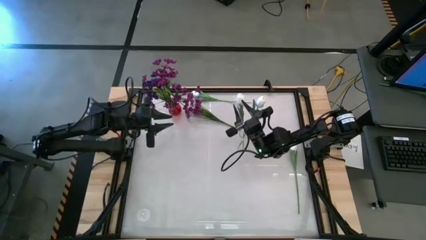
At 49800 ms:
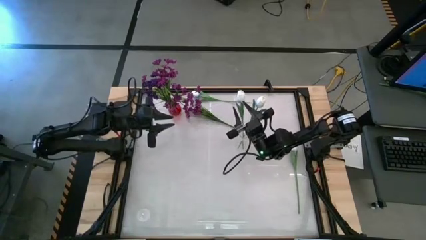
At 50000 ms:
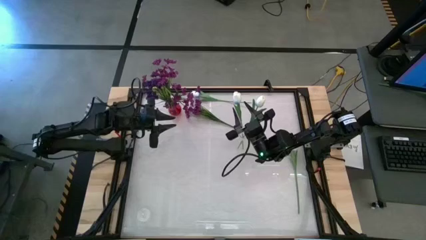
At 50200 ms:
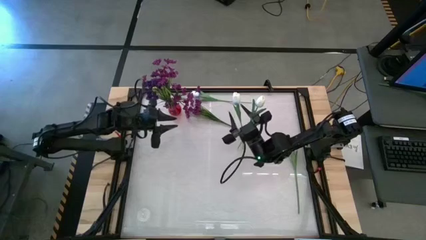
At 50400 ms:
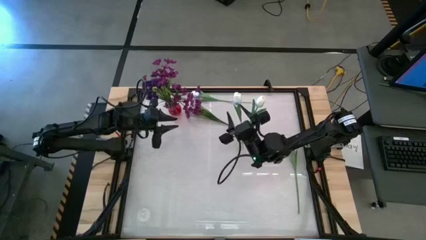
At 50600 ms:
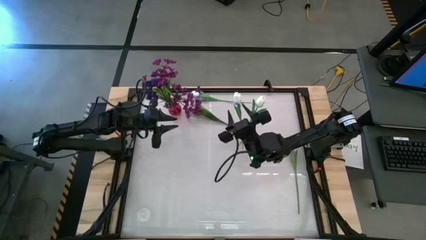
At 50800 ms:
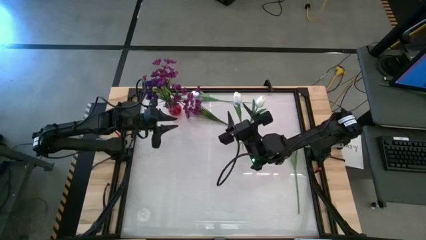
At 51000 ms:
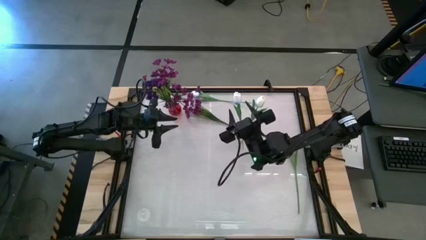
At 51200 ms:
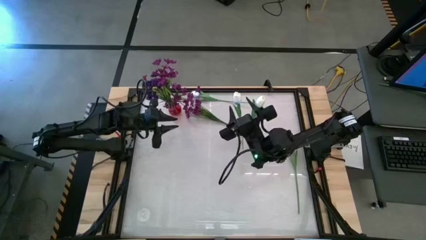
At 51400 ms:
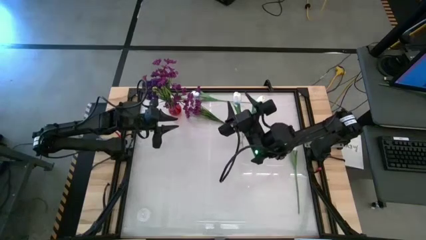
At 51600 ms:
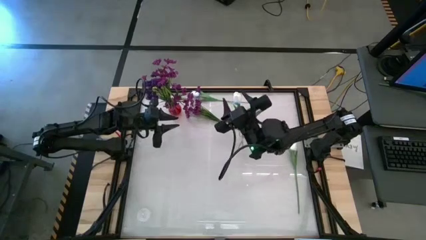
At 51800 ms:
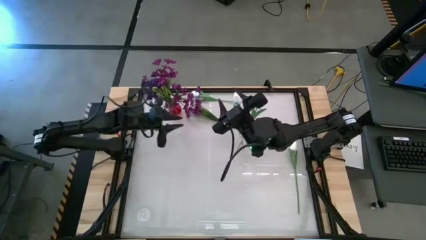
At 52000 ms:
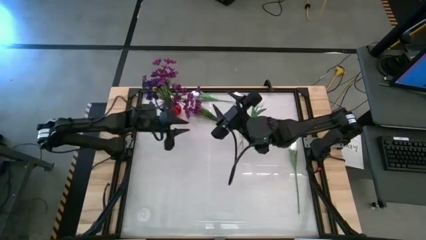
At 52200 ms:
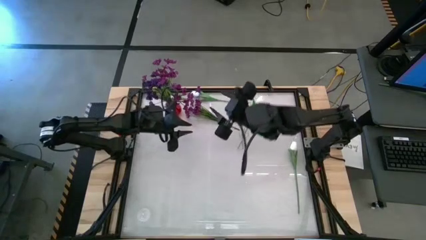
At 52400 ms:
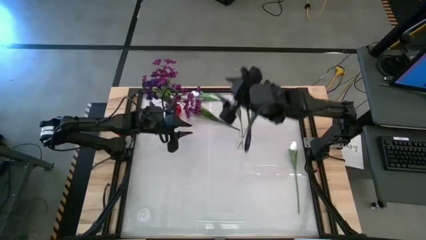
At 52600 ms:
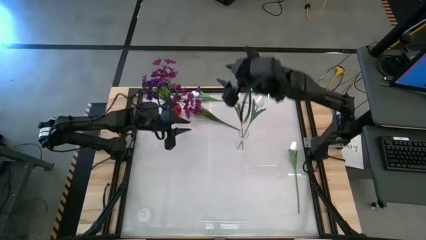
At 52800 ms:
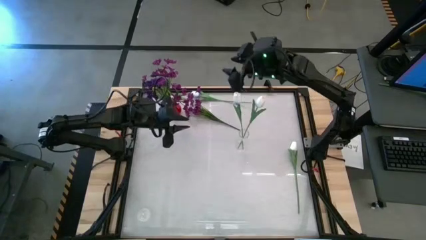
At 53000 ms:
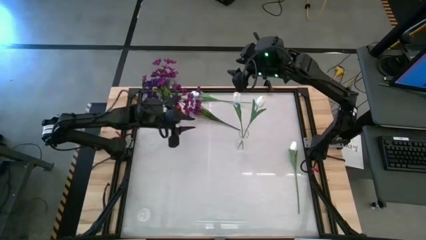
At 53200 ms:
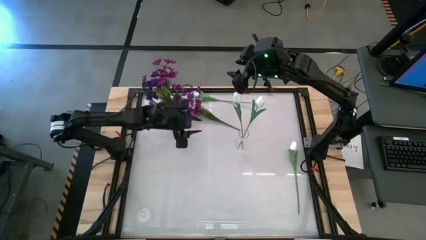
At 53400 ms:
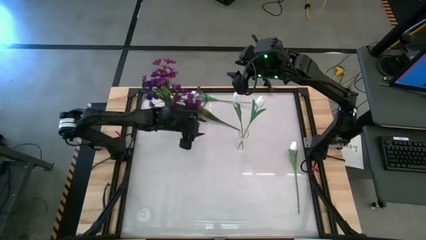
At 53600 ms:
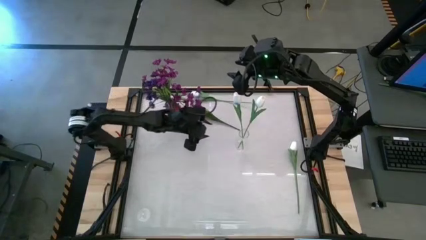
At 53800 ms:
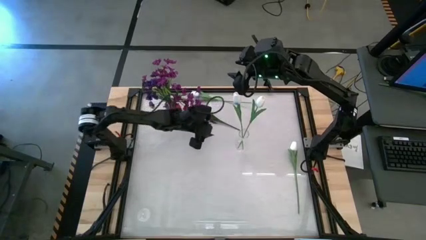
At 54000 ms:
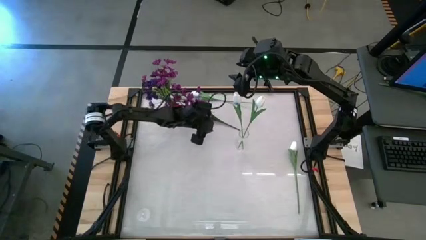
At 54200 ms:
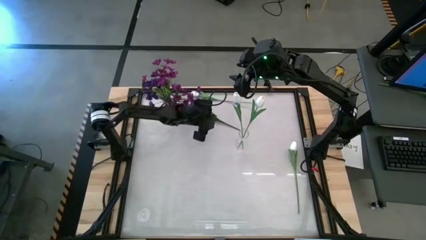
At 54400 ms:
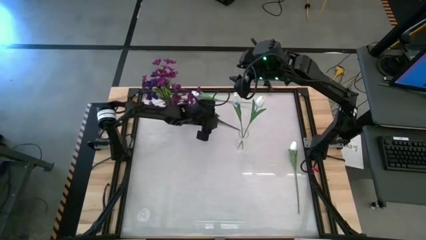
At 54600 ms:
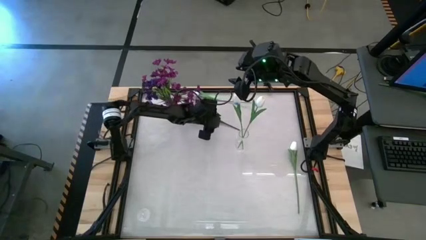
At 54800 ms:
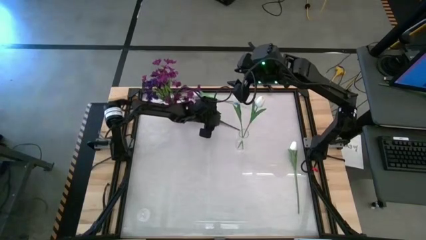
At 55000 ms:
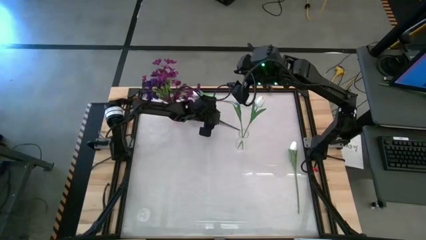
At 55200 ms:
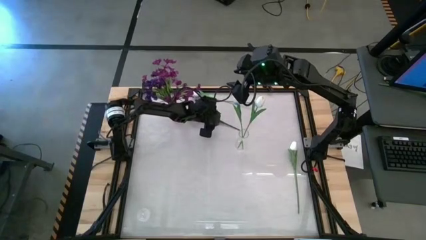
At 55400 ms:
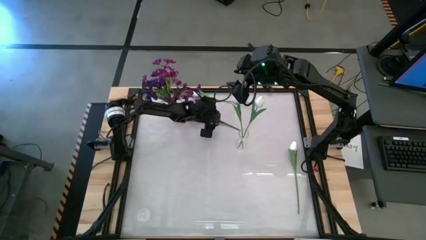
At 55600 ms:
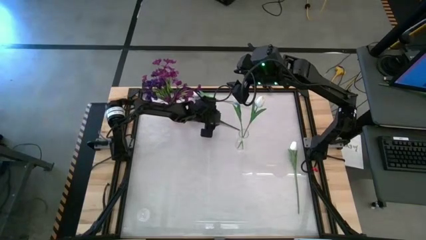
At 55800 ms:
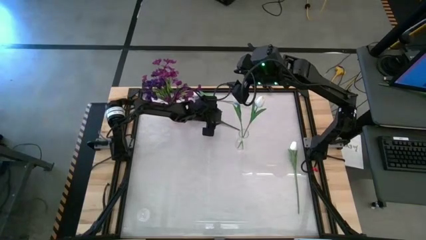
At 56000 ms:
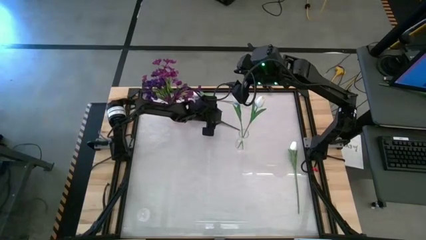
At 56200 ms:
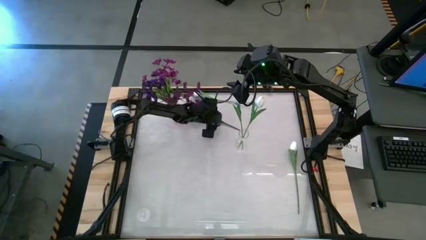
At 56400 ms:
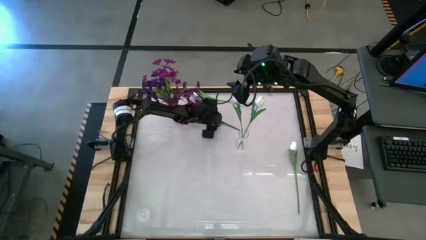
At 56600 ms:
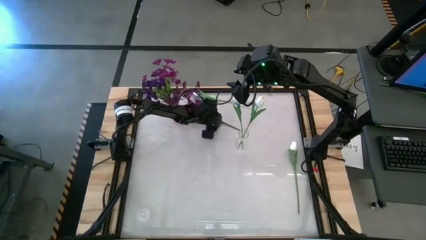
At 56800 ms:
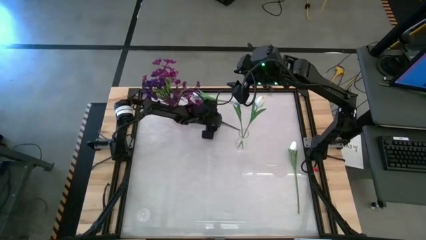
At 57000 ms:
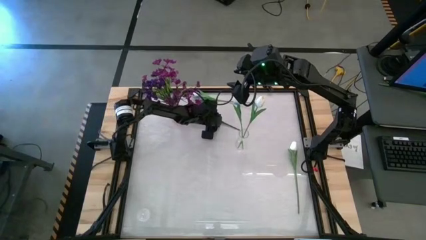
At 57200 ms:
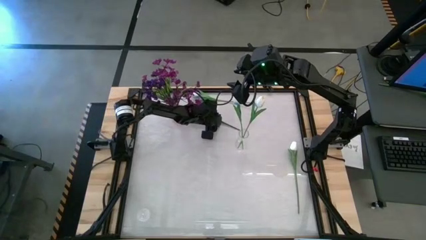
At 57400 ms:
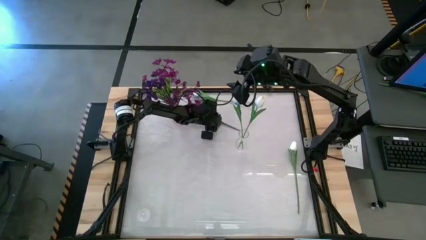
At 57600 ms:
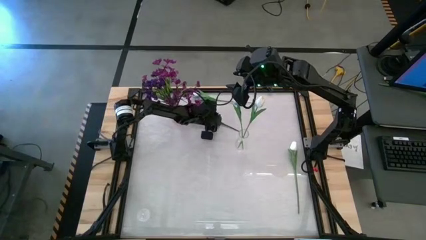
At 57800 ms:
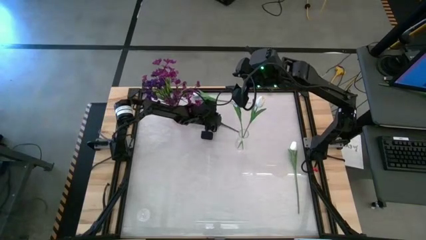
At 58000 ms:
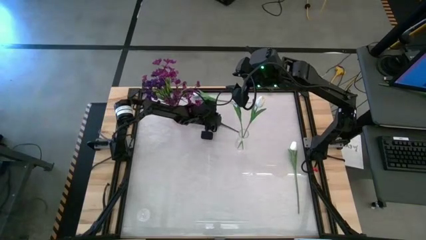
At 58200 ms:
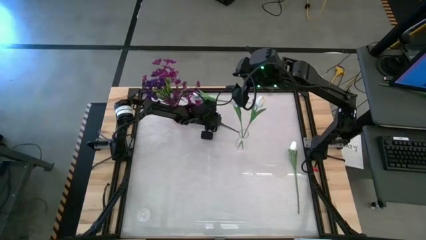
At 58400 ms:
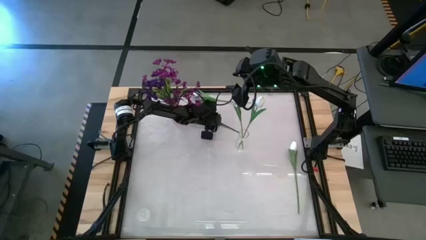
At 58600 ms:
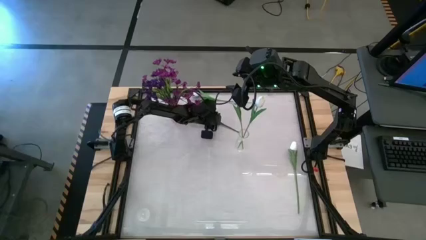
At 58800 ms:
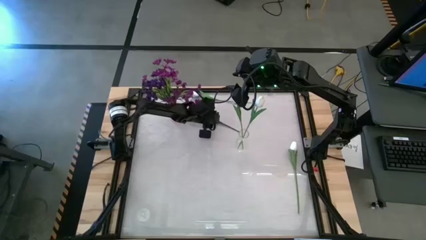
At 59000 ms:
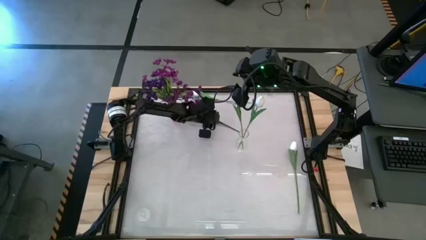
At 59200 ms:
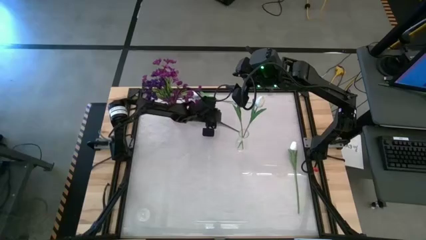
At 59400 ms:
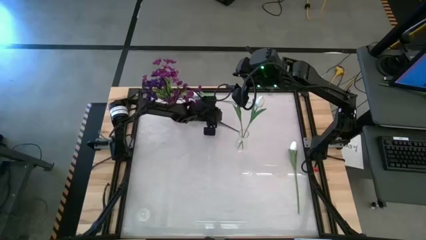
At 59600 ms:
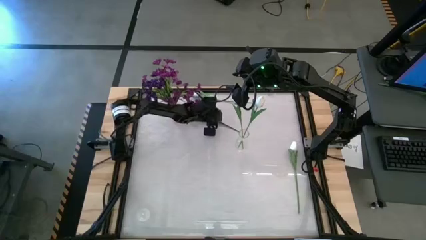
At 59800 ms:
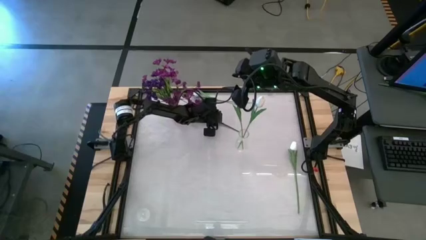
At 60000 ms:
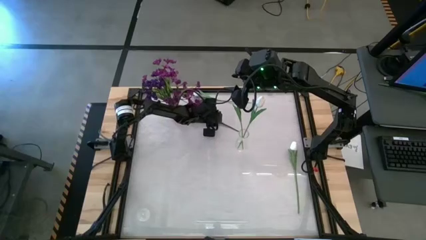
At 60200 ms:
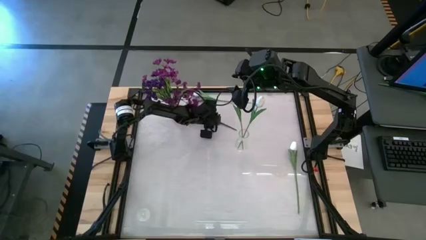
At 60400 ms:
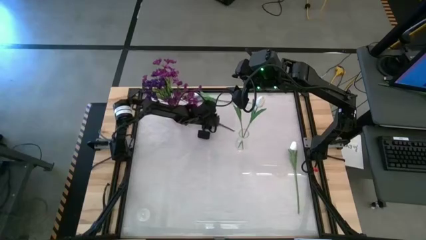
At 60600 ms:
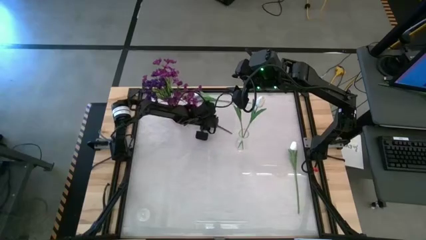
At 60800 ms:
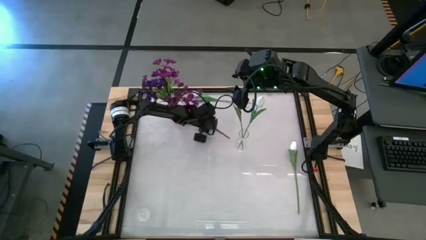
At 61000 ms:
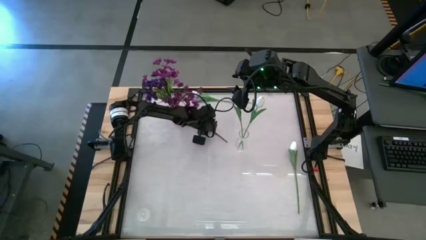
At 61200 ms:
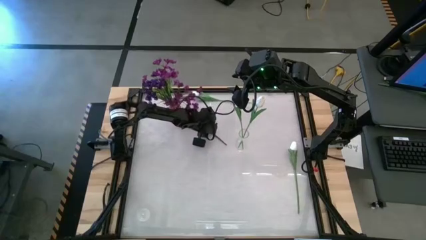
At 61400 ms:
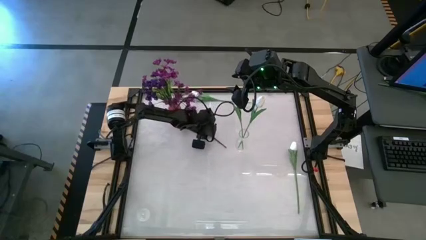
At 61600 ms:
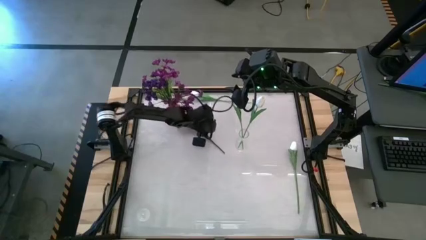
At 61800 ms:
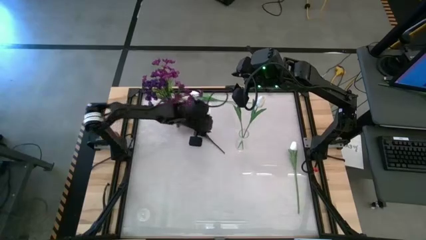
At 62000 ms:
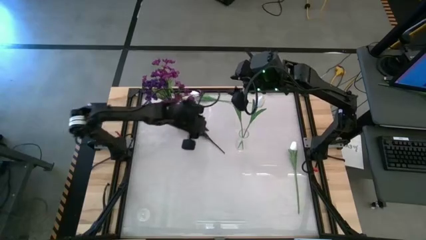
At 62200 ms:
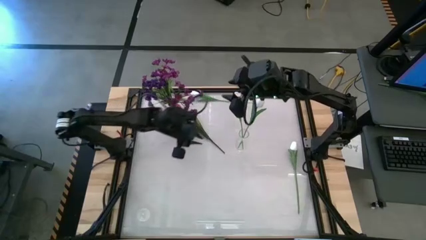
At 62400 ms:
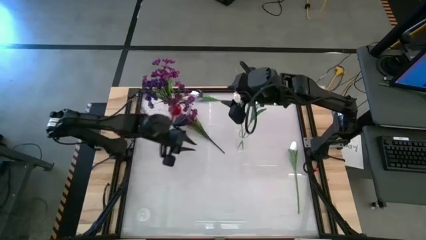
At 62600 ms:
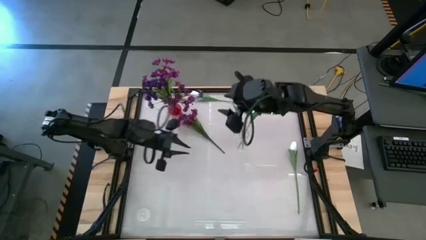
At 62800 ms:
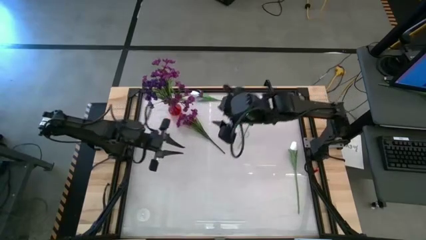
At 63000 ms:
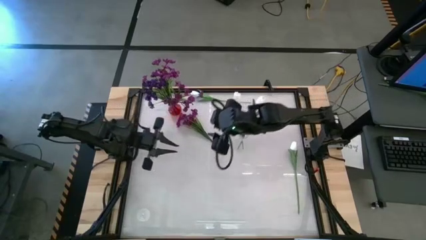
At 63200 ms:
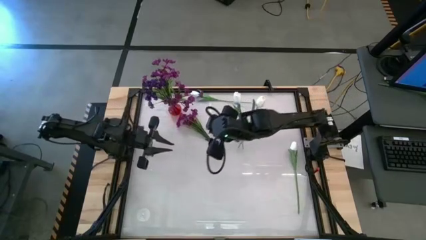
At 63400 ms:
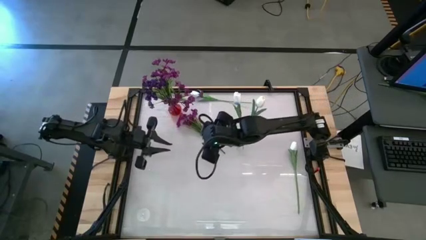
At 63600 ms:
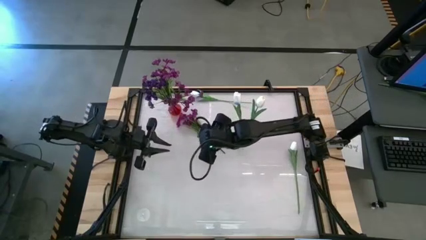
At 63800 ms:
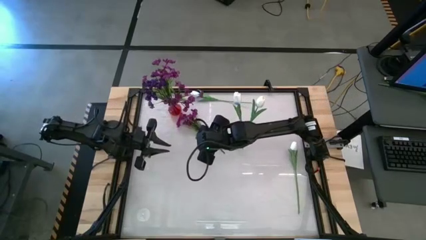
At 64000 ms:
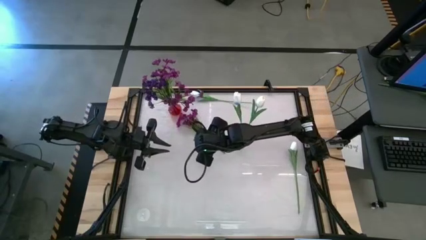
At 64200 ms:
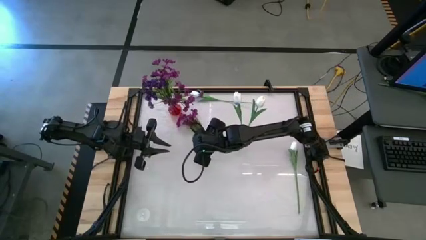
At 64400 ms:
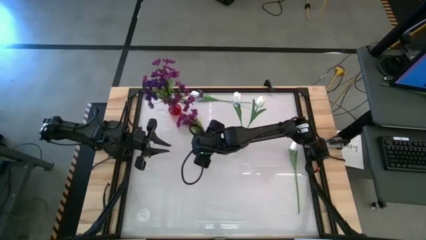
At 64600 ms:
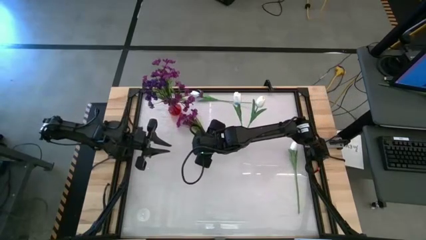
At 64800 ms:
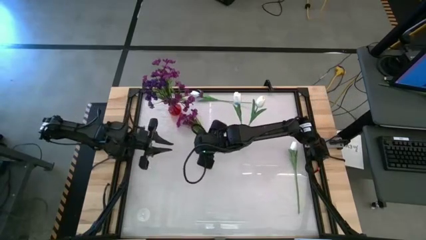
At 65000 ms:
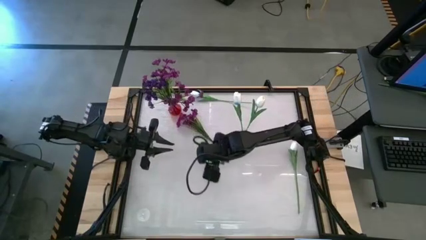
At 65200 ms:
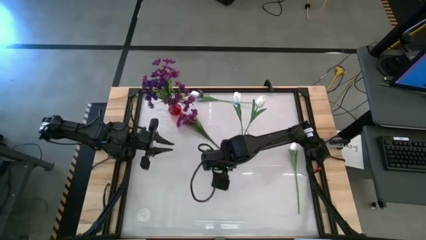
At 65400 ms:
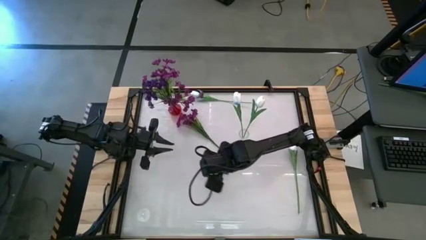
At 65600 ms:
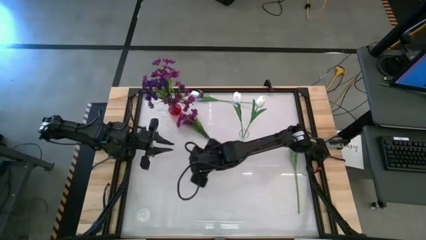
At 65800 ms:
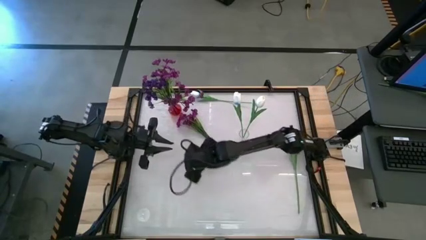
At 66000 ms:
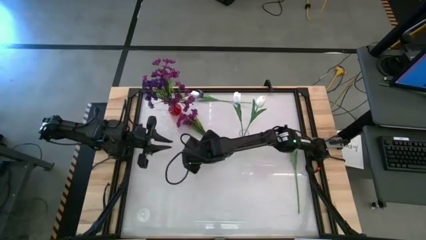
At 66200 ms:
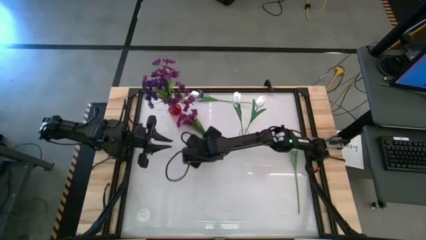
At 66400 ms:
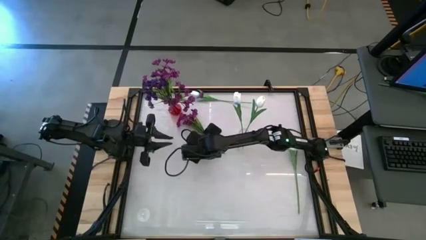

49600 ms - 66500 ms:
Task: Sort flowers into vase by color
Put the light purple flower into the red vase
